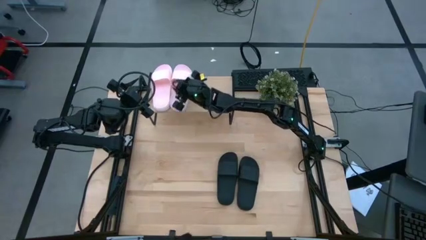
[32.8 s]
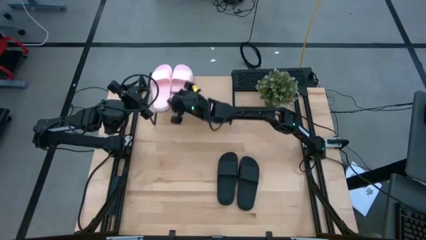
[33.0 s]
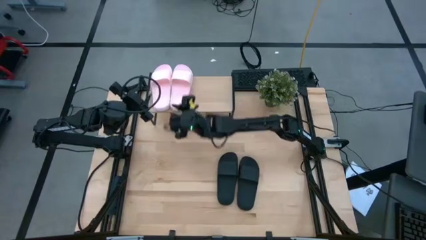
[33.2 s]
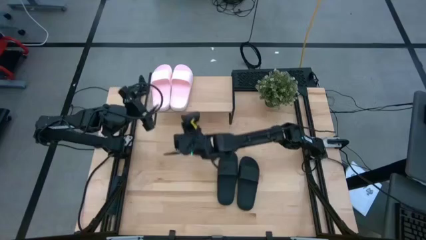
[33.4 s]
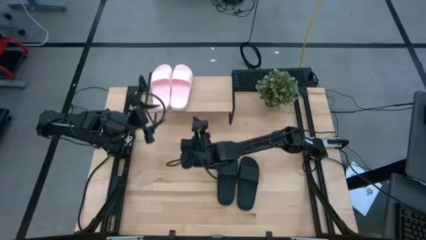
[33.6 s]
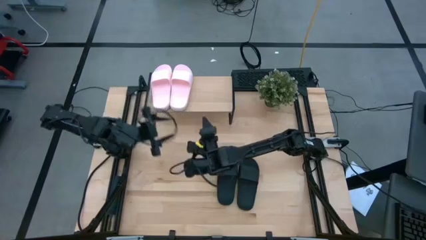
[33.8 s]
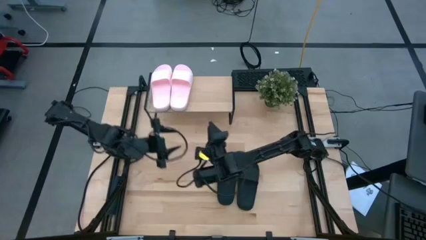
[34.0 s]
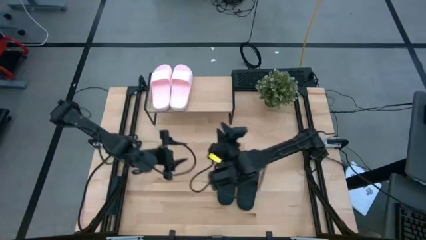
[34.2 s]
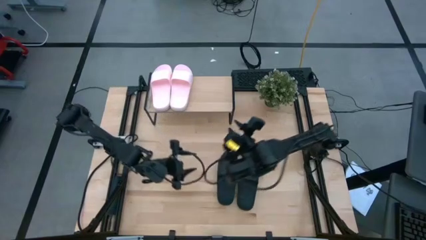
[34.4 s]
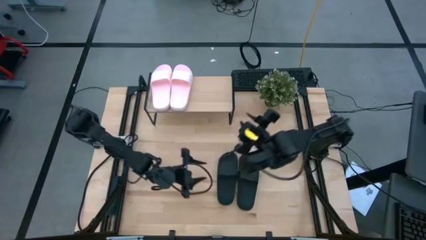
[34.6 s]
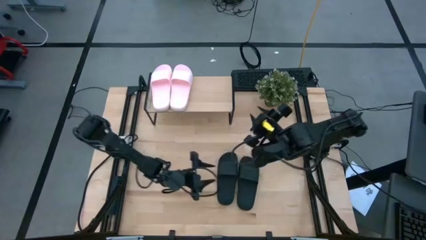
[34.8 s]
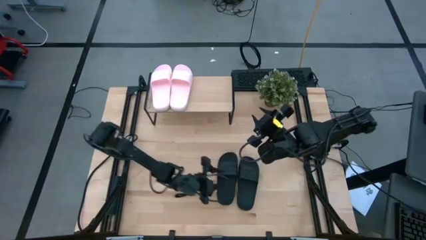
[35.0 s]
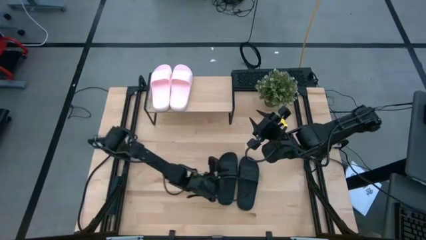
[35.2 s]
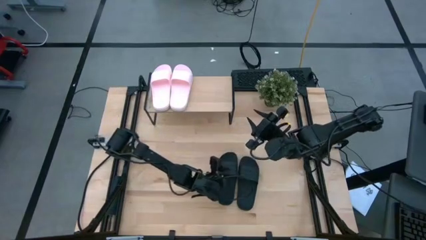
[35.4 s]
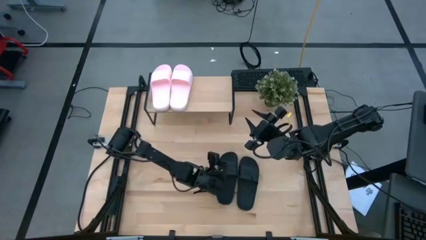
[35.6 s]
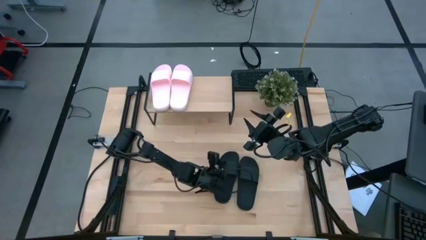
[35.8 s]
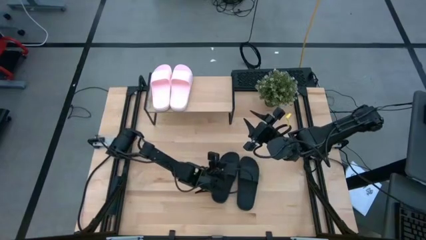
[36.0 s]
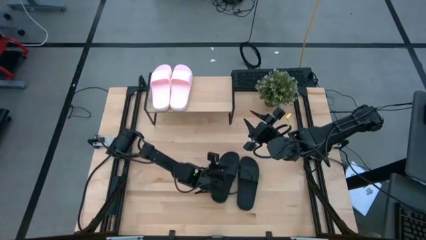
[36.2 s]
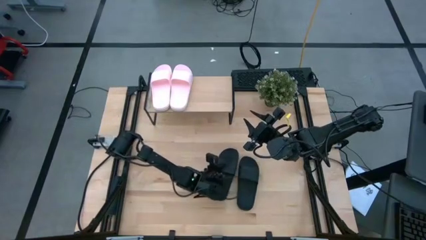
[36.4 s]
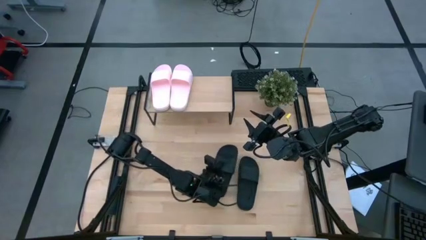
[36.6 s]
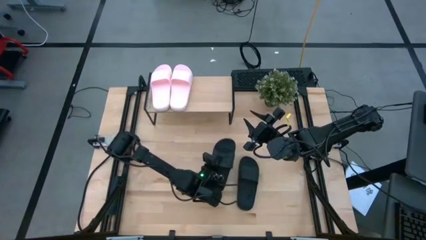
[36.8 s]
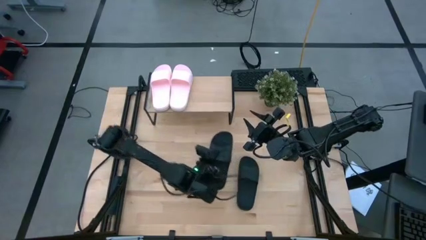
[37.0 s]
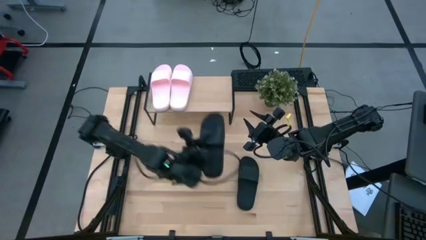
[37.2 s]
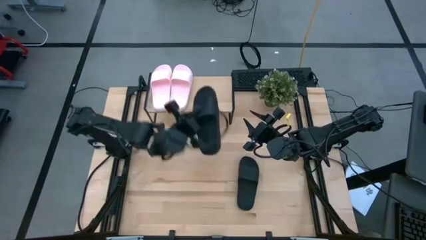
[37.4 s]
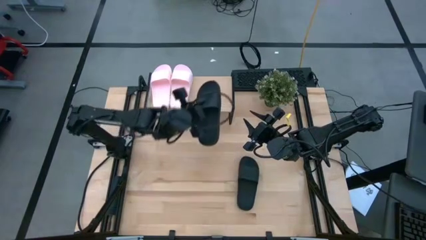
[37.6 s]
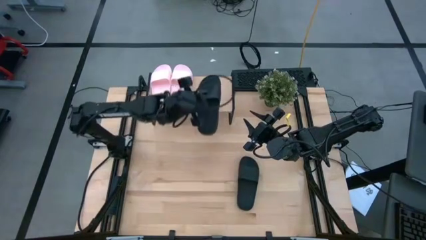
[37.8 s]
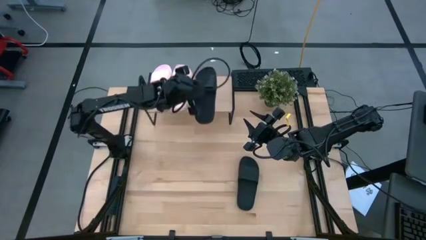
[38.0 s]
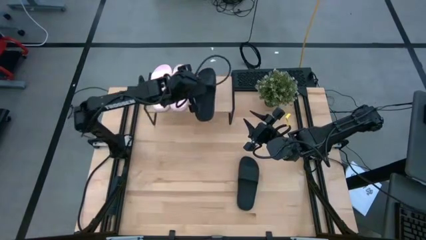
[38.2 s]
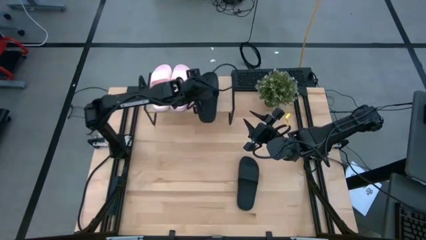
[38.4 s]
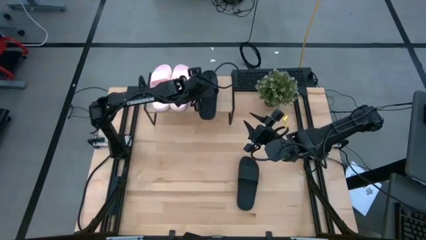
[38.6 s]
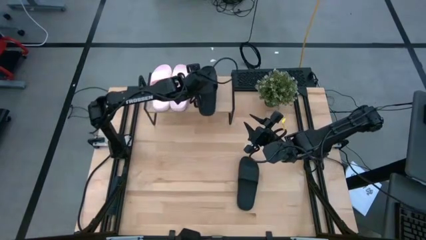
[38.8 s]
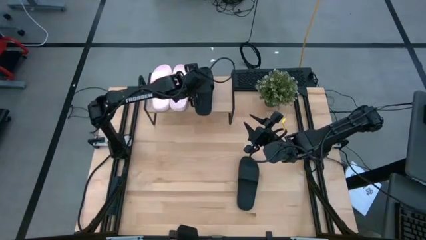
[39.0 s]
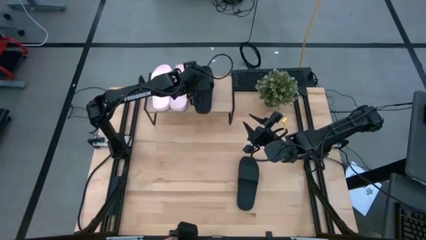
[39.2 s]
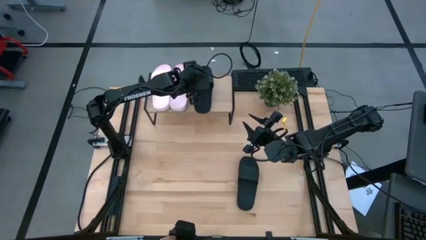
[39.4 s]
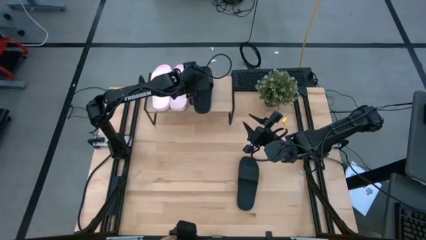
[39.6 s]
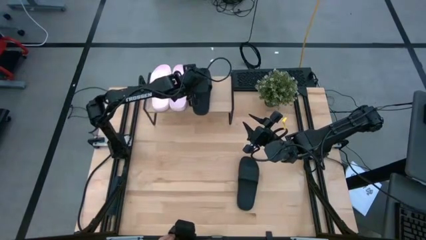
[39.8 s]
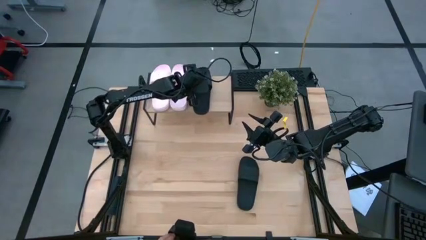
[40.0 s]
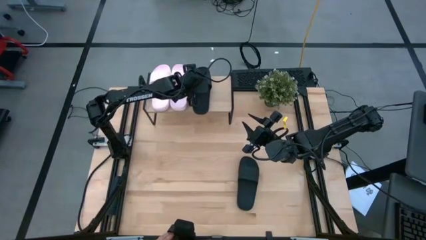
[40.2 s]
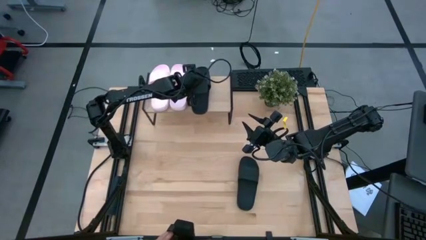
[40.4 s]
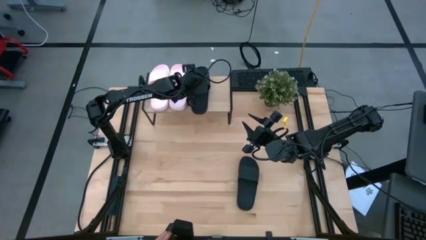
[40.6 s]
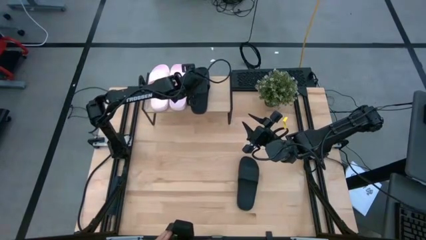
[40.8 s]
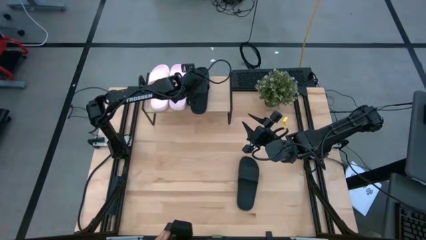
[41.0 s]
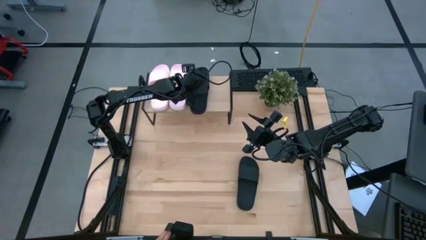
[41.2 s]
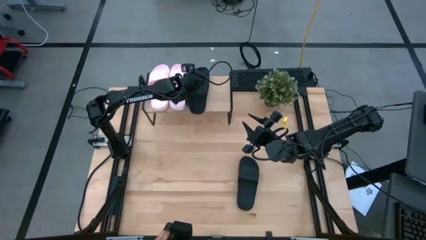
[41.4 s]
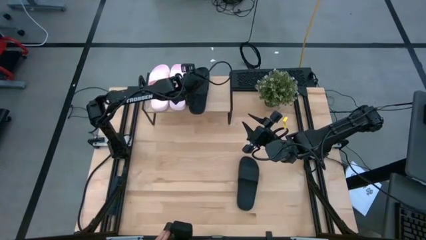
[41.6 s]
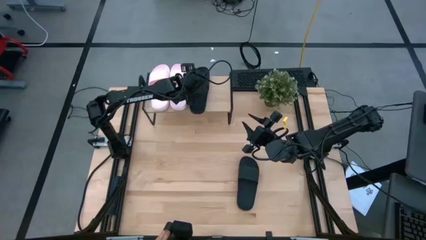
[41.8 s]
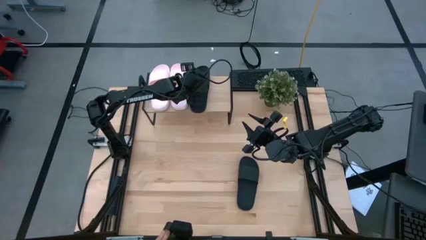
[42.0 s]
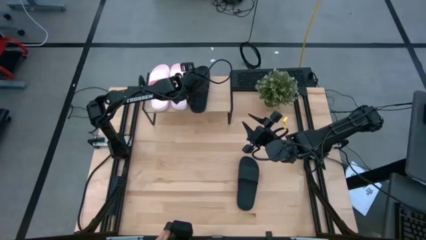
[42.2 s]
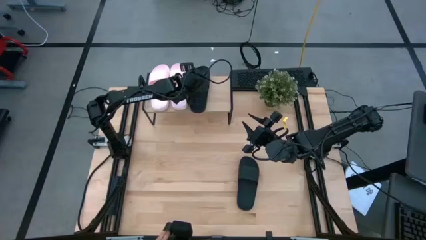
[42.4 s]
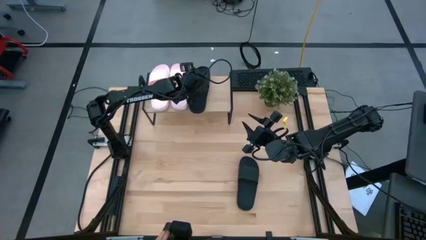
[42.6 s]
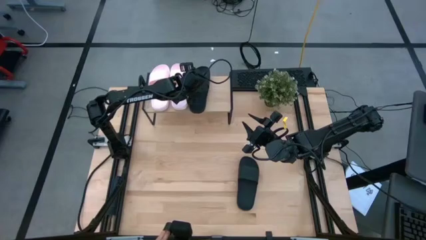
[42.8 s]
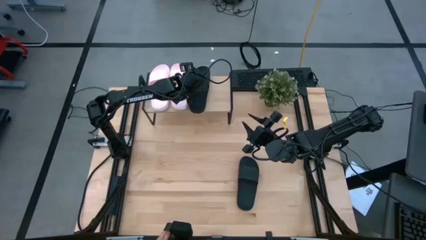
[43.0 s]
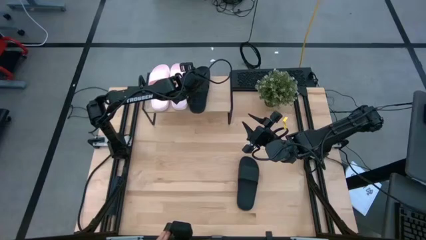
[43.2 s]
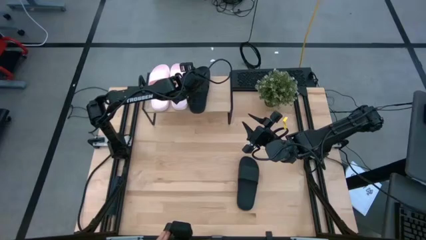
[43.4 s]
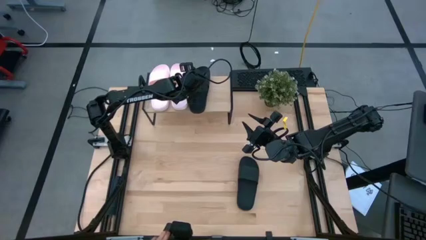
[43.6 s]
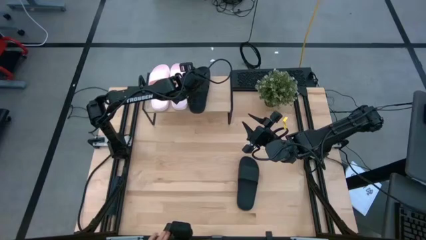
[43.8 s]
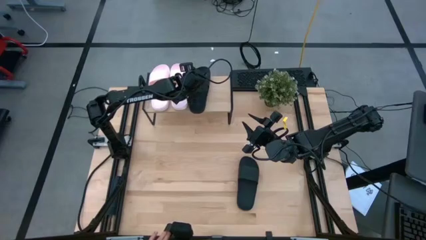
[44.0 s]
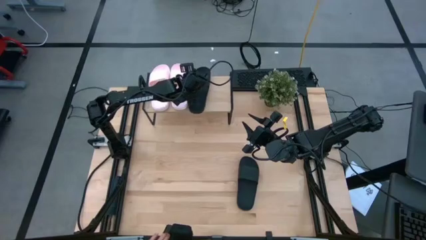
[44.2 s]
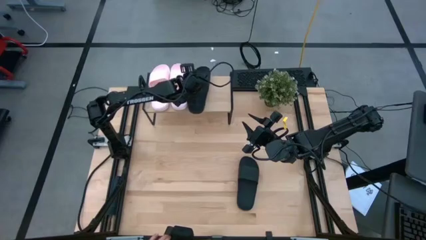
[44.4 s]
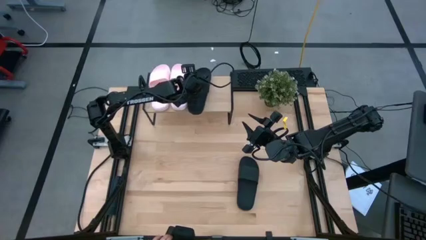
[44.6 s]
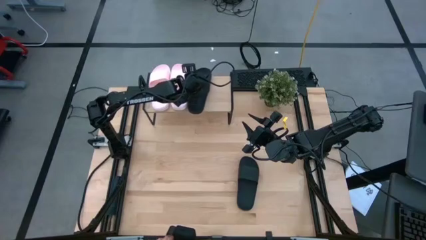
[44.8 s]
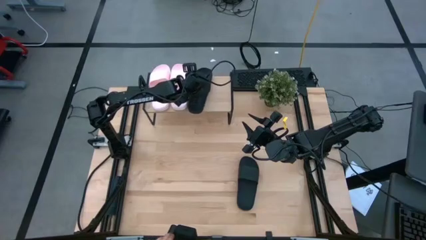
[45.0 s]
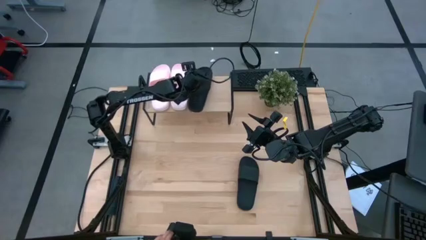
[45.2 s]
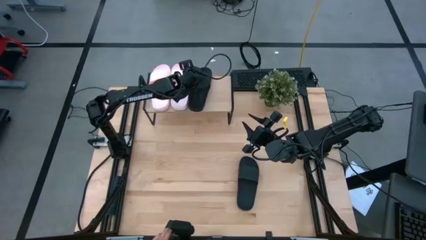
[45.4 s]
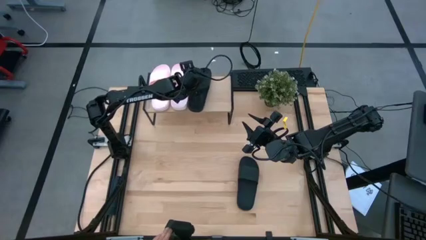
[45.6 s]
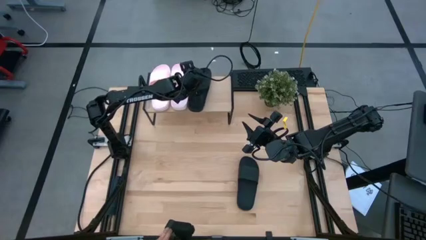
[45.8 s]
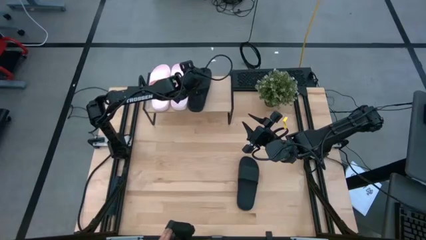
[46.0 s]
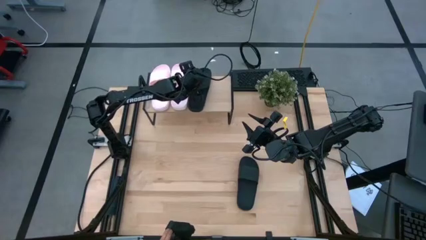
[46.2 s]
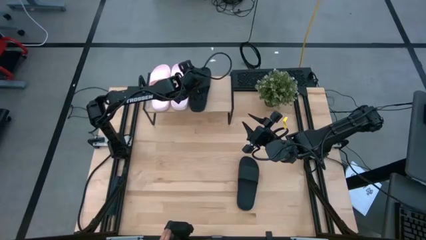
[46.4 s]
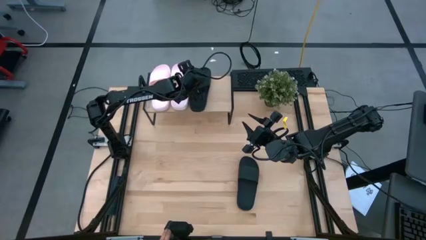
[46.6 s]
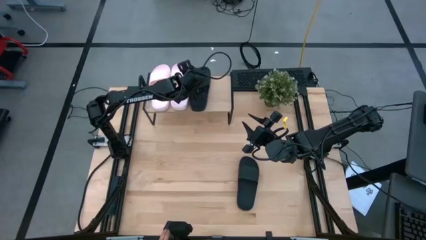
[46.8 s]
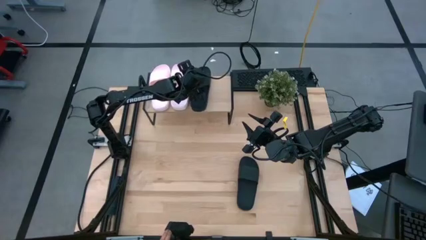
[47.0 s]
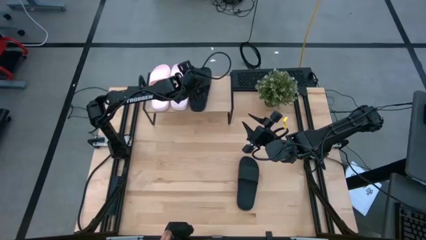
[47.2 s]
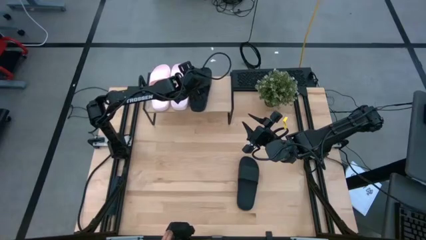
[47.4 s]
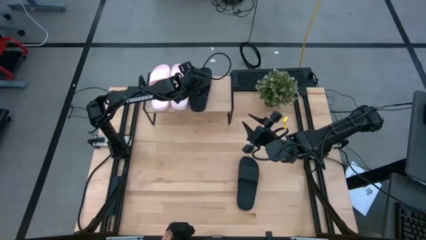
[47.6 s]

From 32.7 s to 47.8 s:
Task: Pick and place slides into the shelf
Put the left black slide on the shelf
